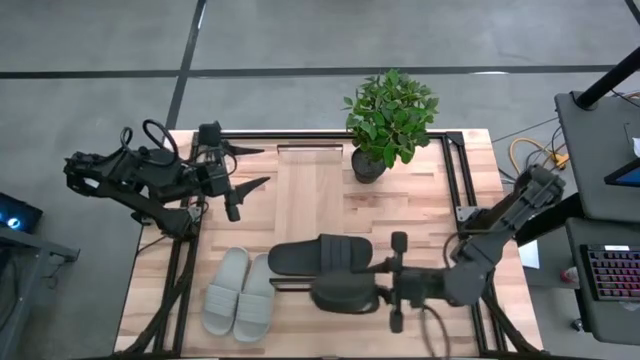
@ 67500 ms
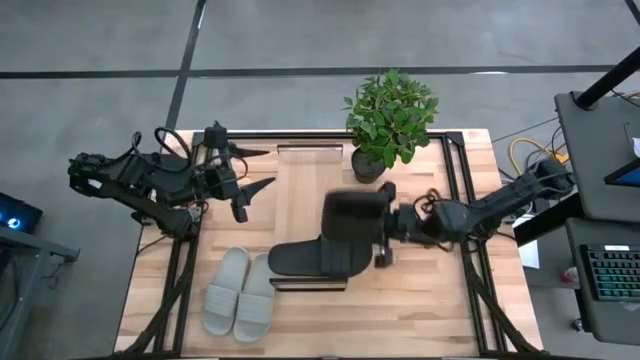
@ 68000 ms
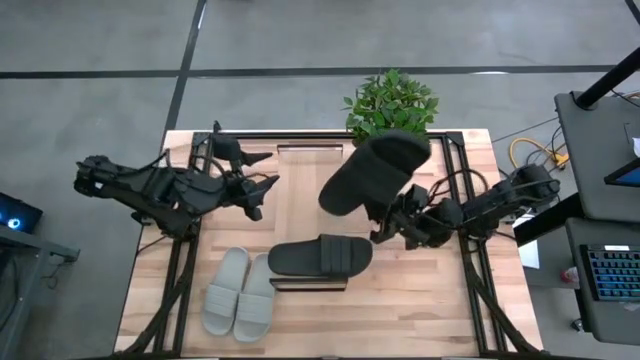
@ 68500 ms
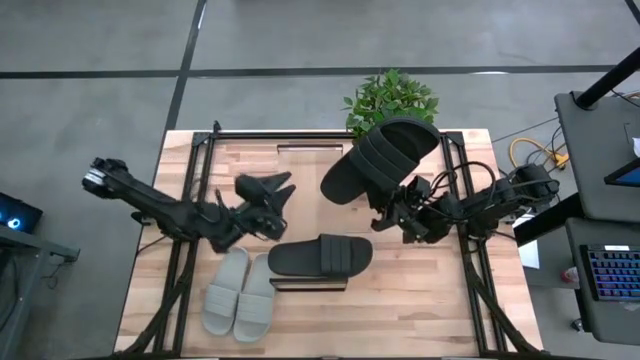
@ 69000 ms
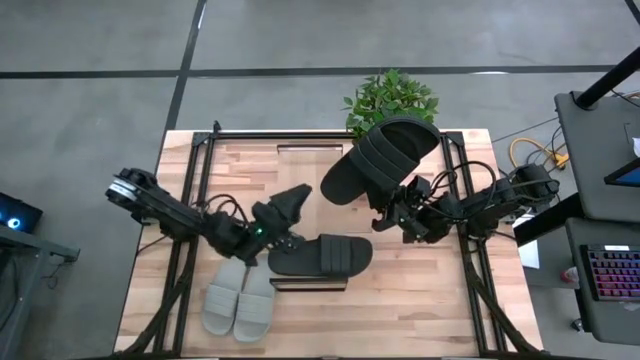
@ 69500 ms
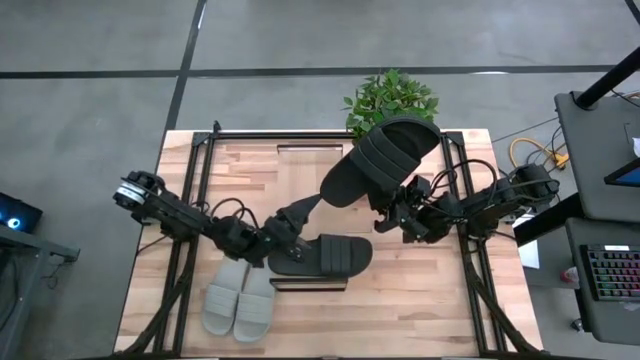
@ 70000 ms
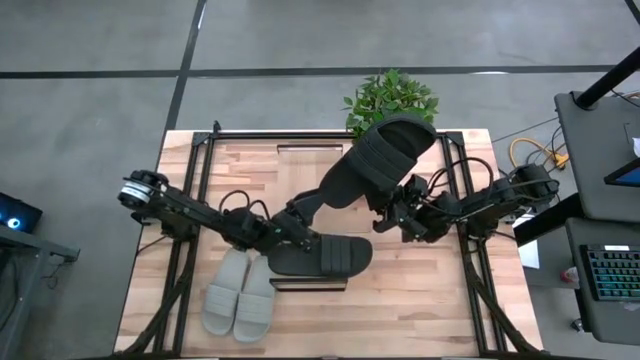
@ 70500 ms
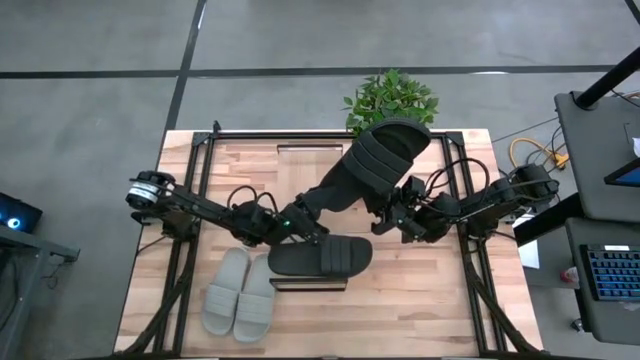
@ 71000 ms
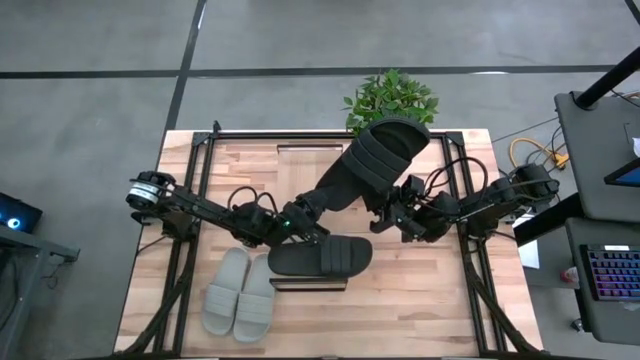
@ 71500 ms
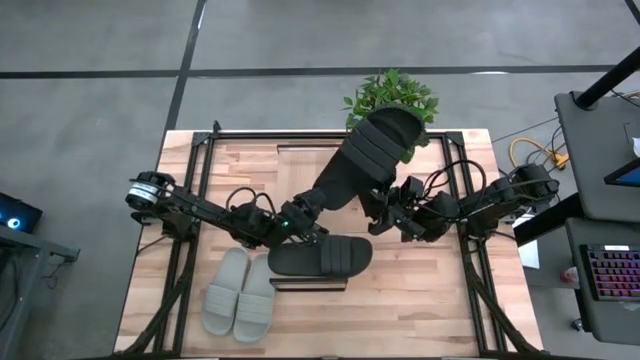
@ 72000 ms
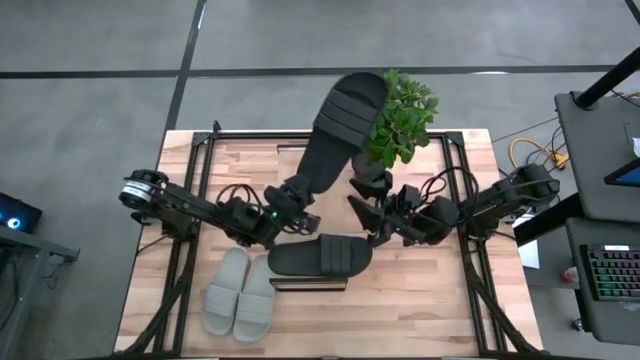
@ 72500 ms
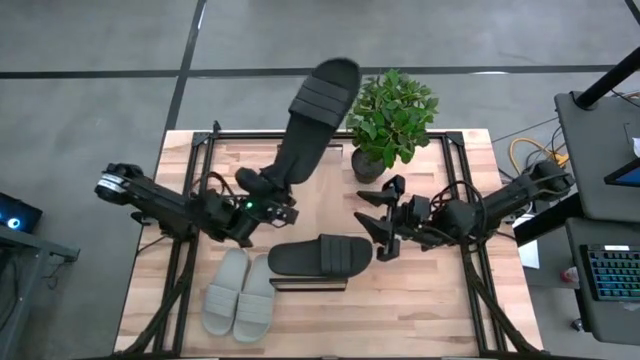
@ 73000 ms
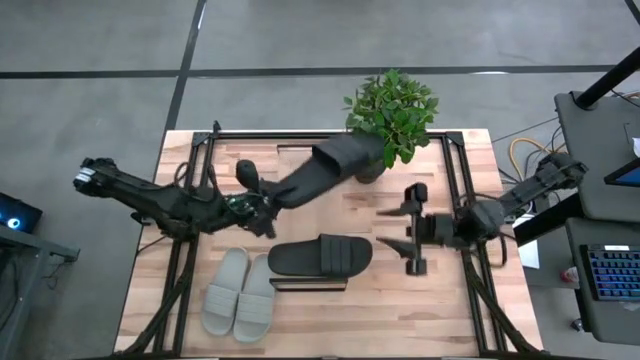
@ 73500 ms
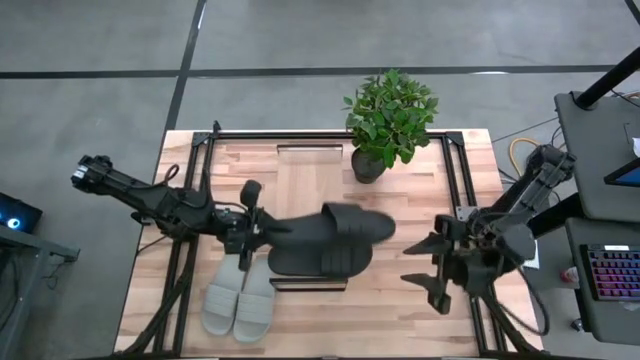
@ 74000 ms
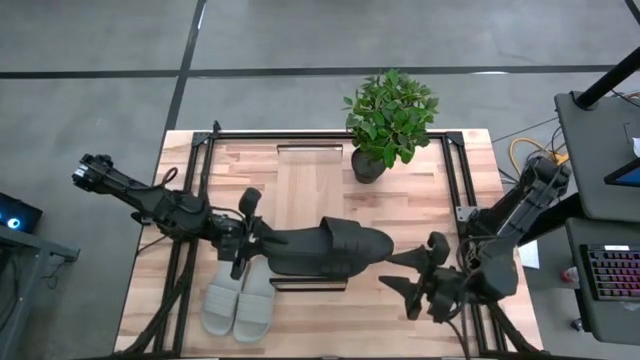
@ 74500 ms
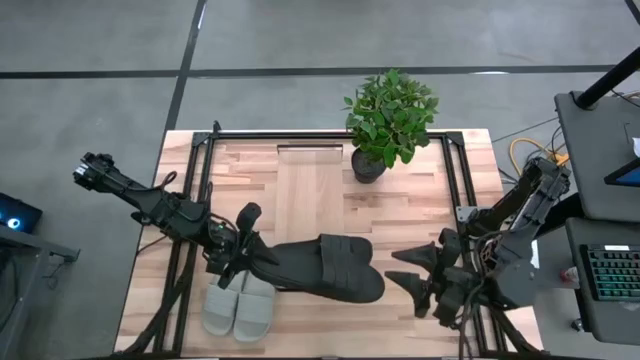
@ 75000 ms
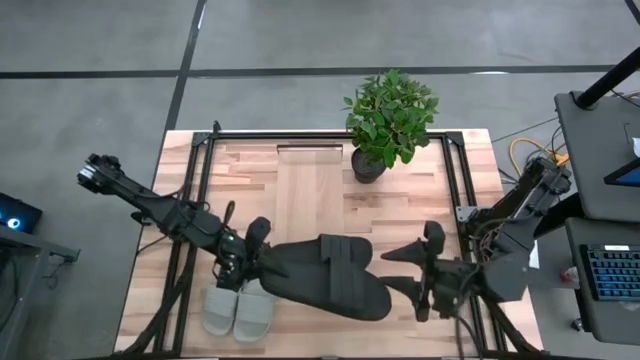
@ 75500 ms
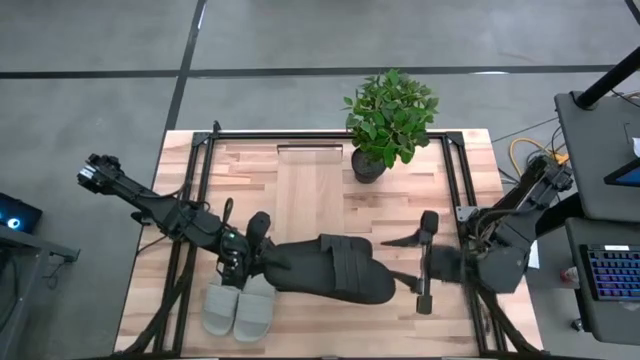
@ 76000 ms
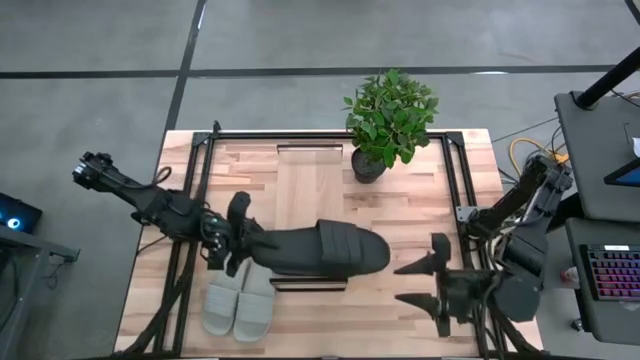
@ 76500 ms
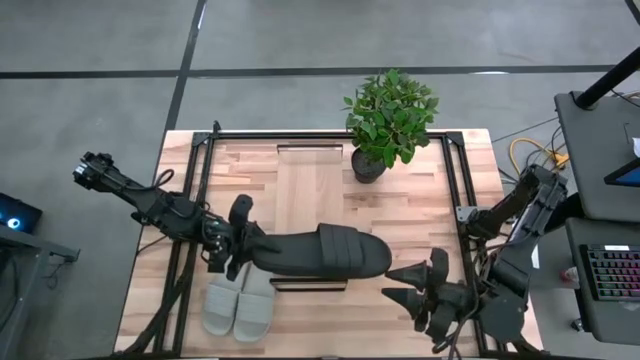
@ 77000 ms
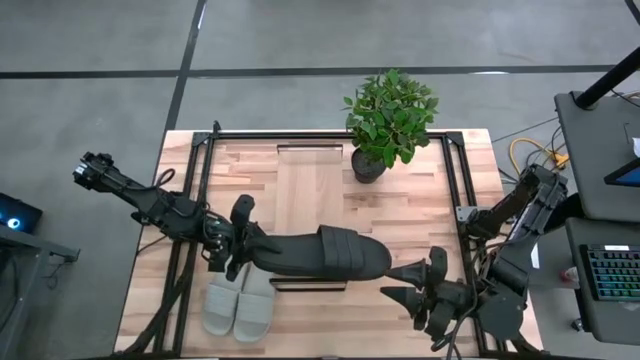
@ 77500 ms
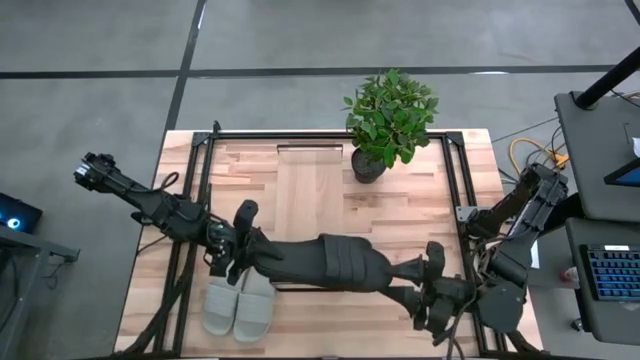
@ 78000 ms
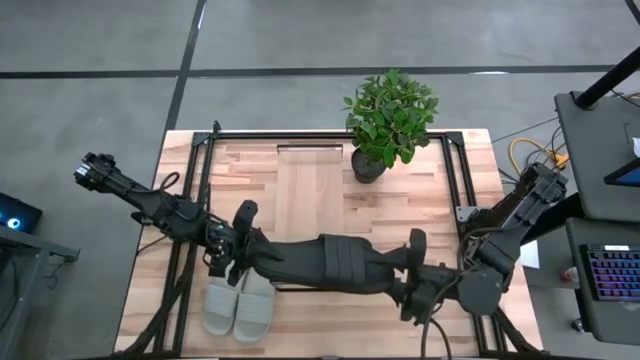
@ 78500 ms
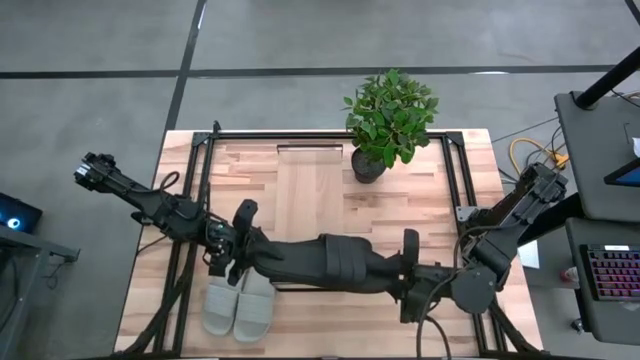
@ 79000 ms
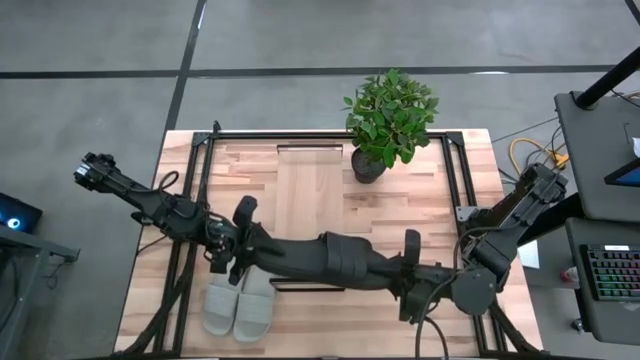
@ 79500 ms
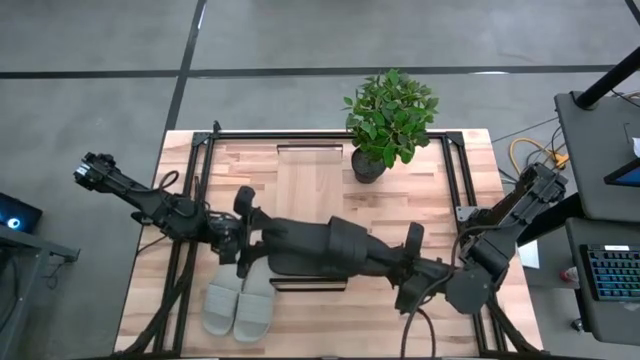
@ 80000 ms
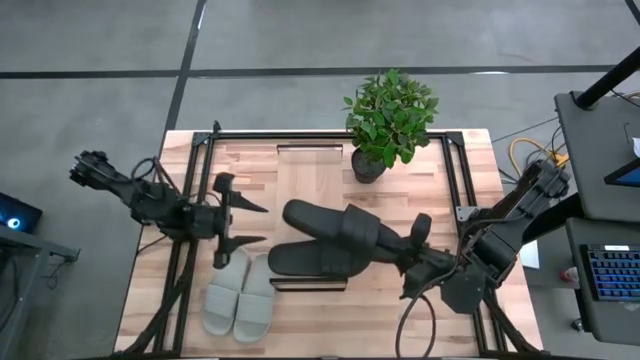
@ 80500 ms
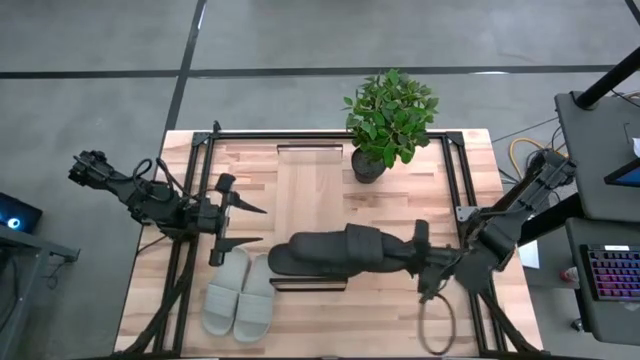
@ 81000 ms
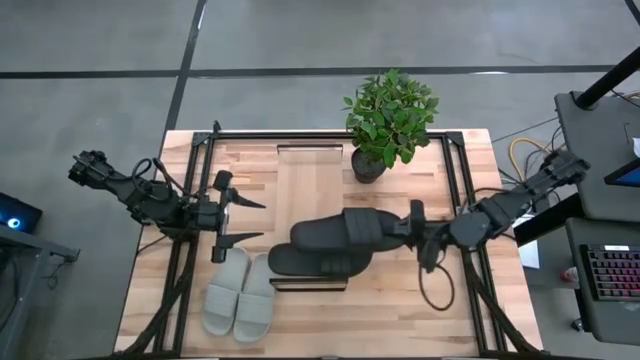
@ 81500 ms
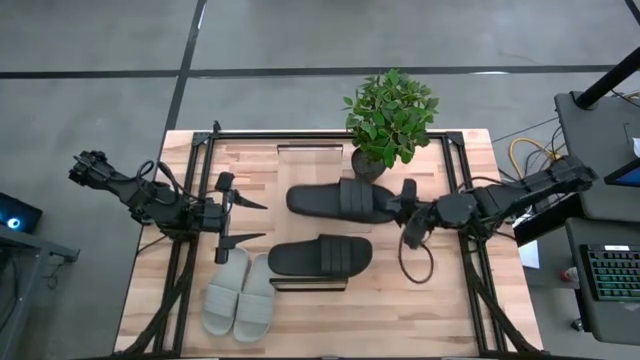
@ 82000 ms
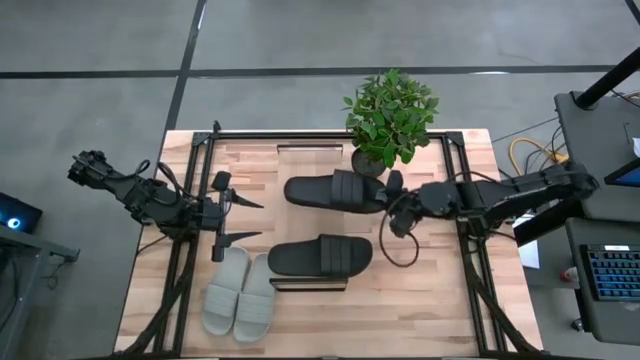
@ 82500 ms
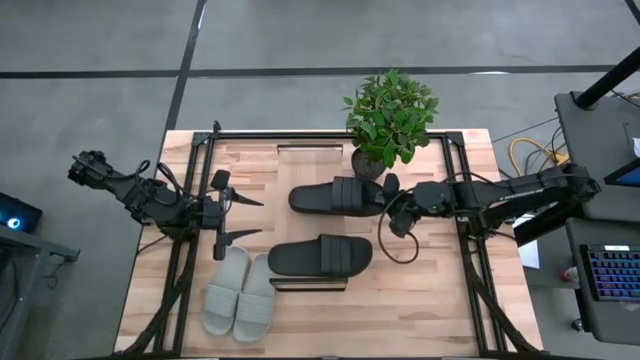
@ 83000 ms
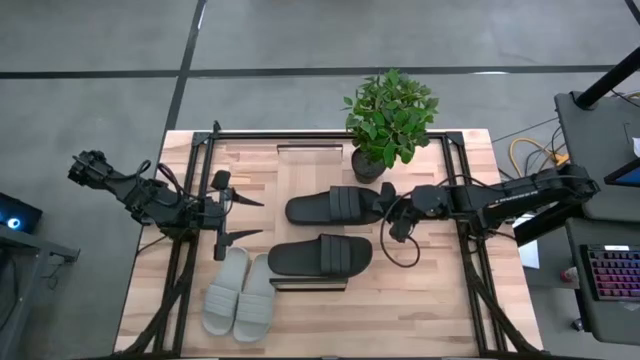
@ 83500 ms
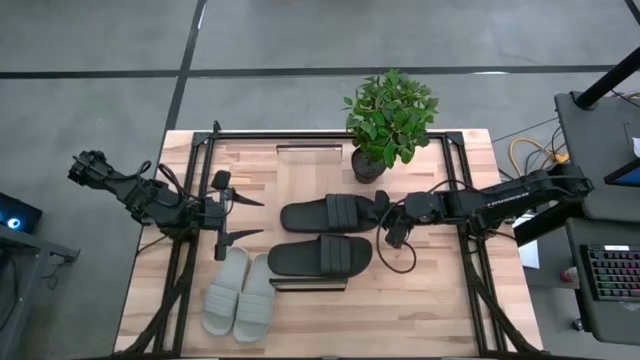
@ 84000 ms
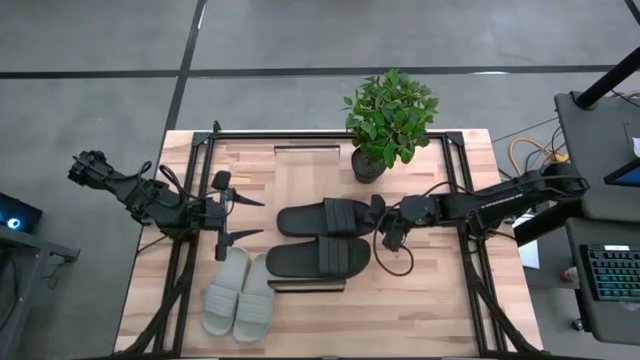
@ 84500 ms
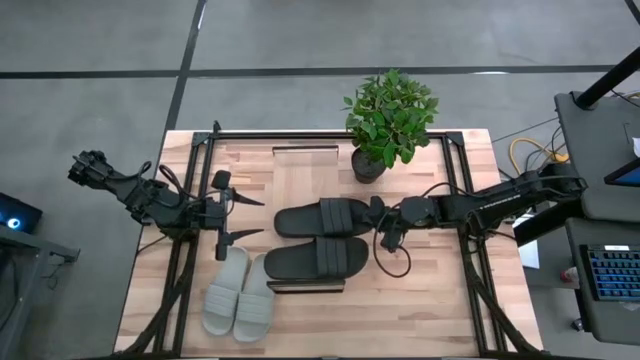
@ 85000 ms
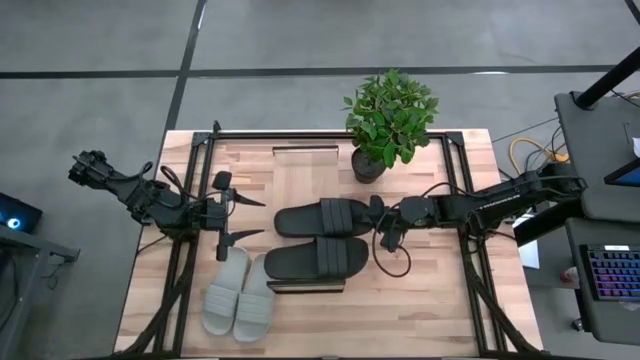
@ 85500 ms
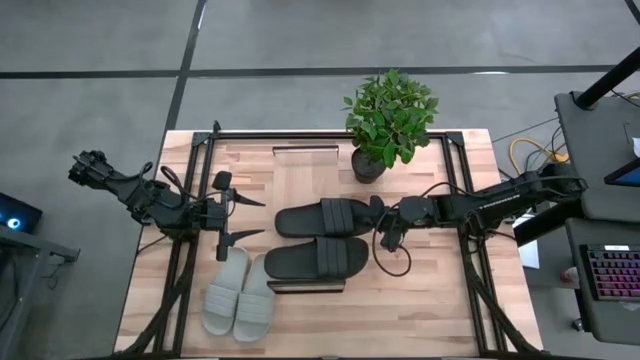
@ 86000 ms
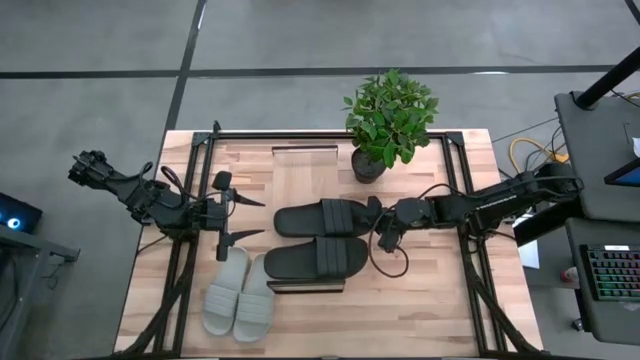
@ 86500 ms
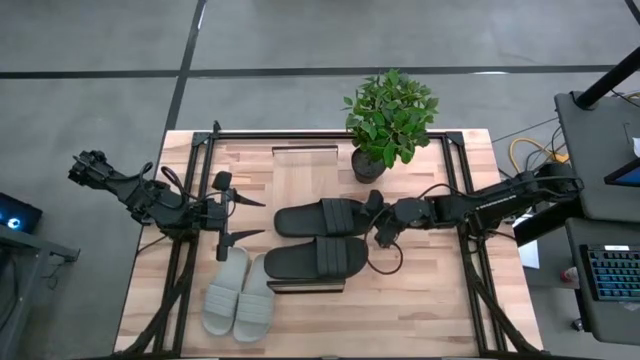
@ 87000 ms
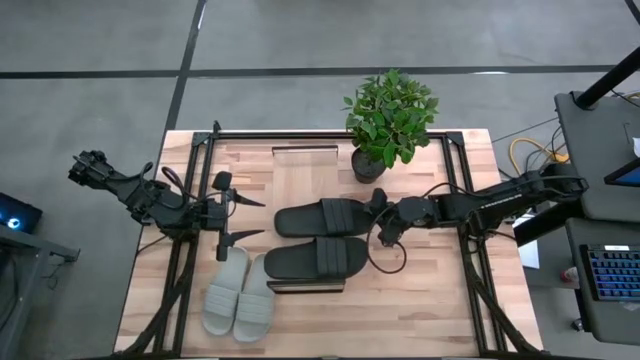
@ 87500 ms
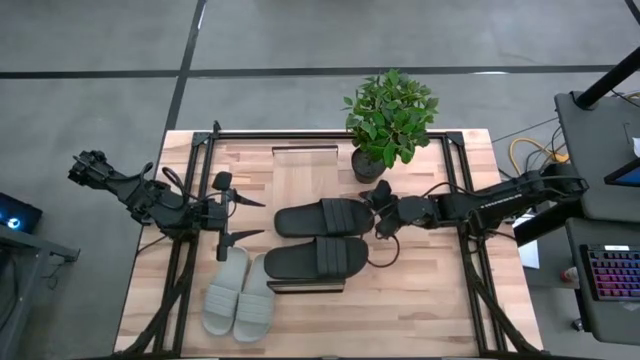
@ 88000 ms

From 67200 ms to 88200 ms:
Task: Pick and place slides into the shelf
Put the black slipper on the shelf
